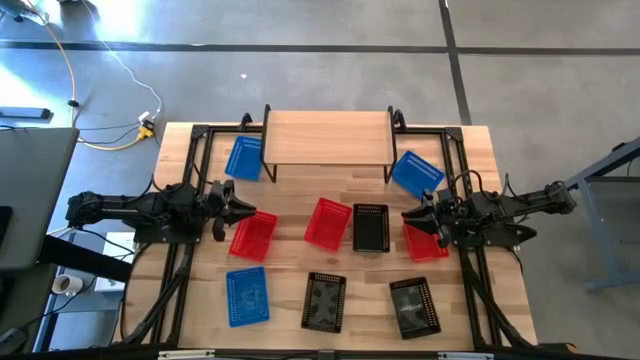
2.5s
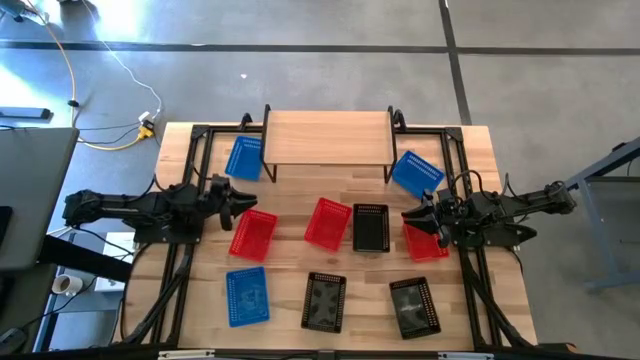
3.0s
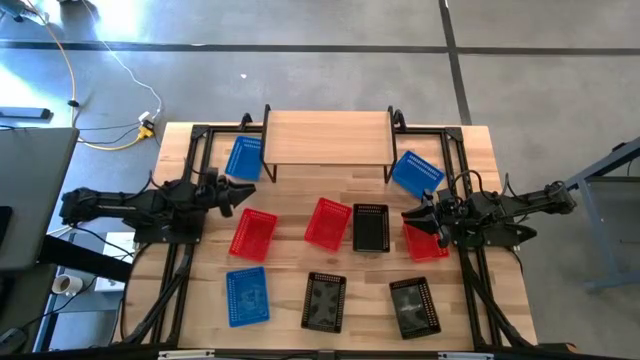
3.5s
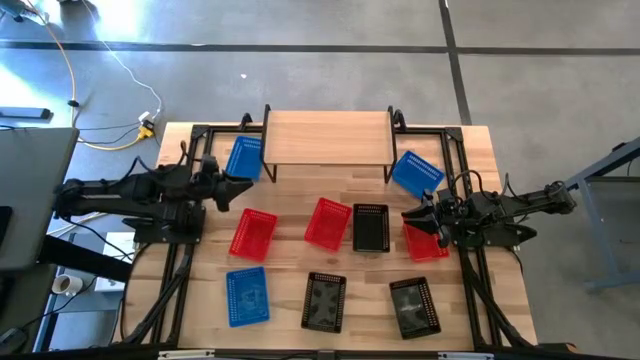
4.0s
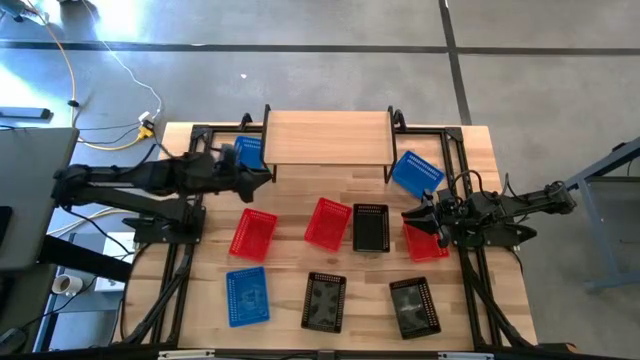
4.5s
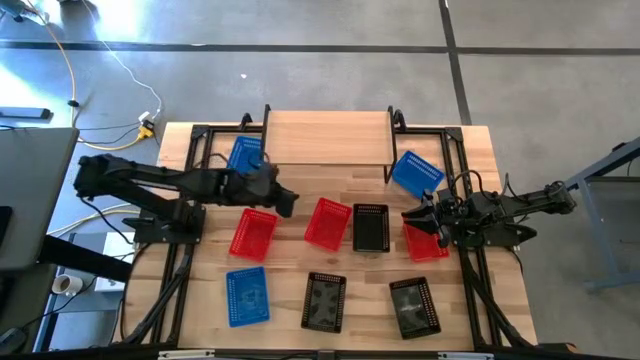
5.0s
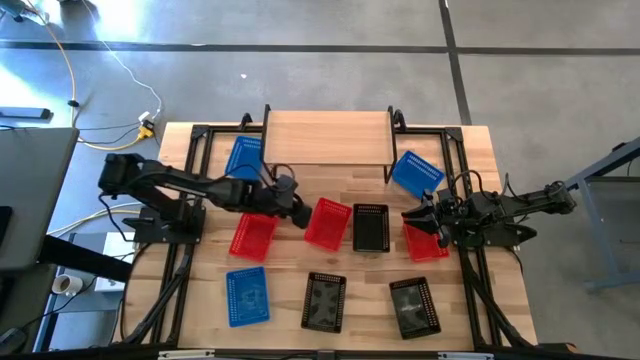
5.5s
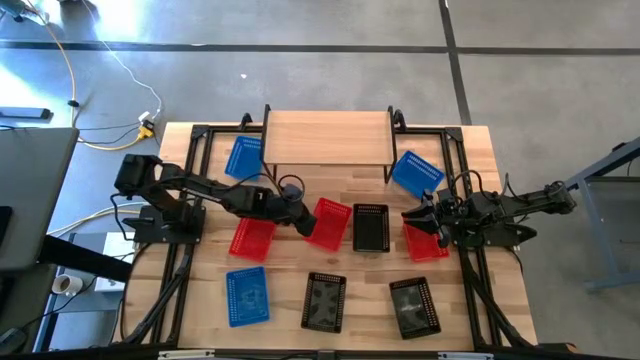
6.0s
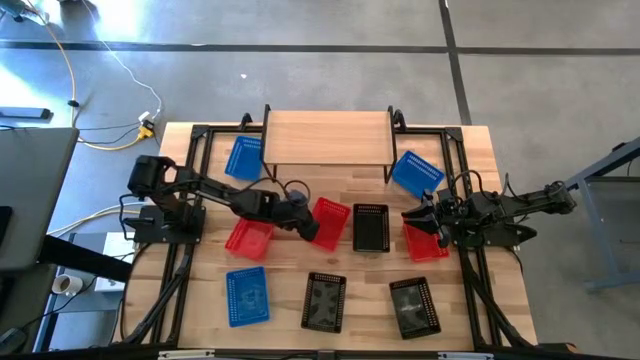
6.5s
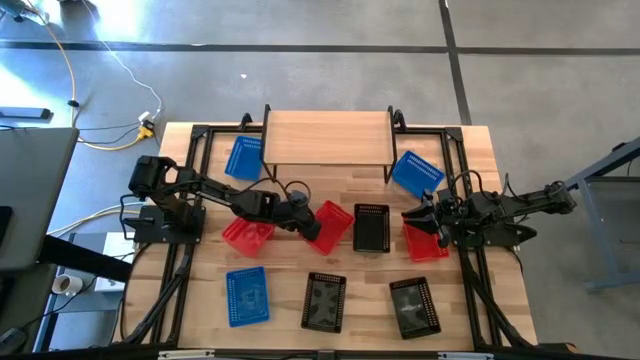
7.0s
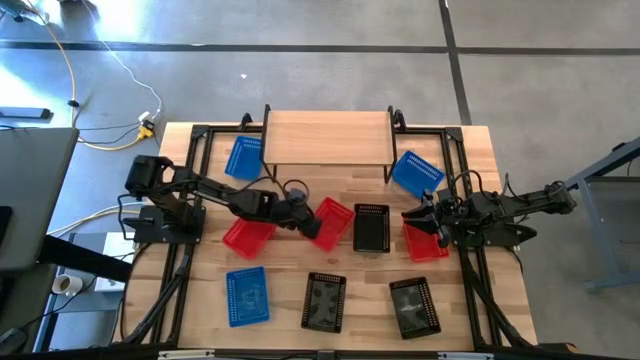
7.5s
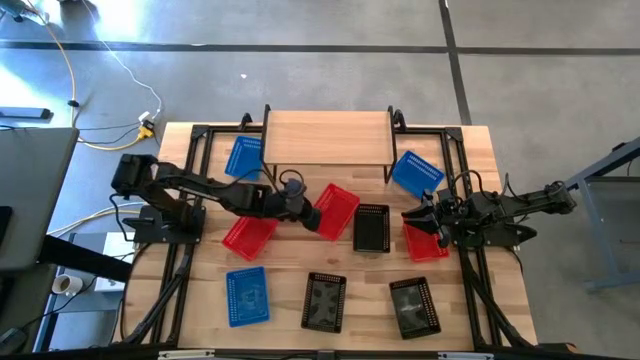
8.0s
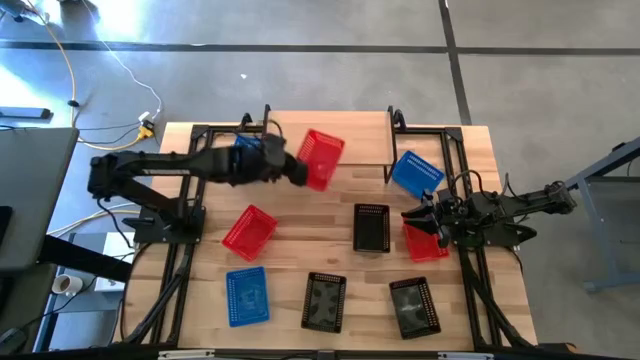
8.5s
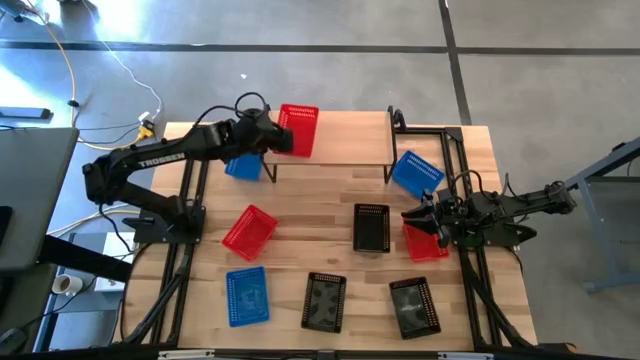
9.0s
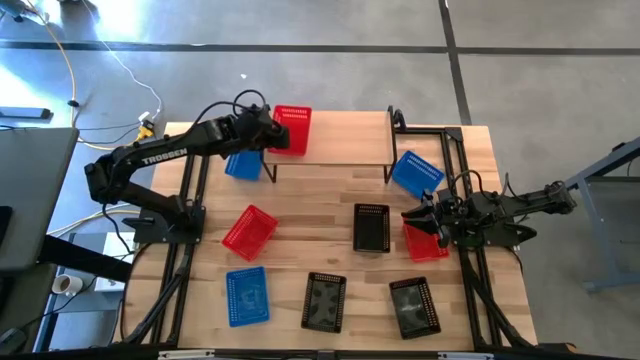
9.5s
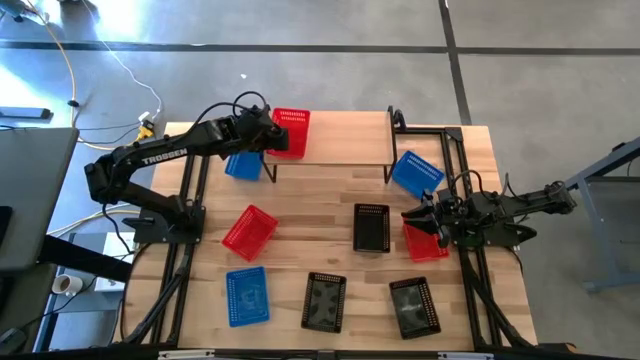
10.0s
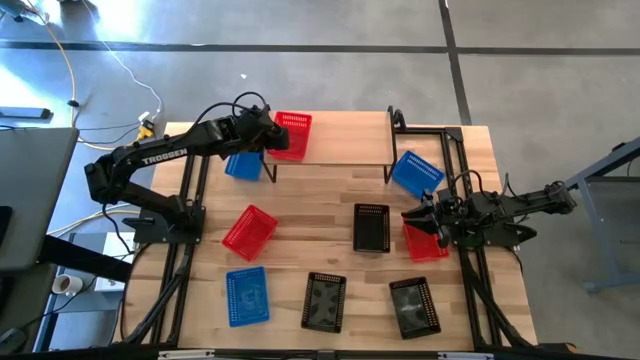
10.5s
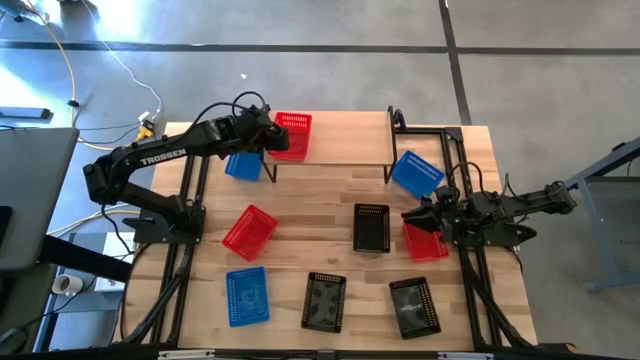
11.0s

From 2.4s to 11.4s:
Task: Stack baskets on shelf by color
Put the middle red bin on the shelf

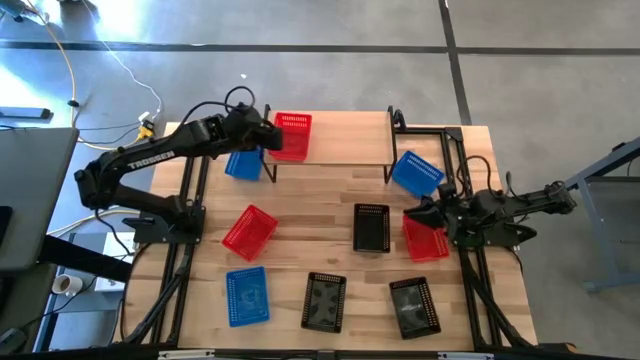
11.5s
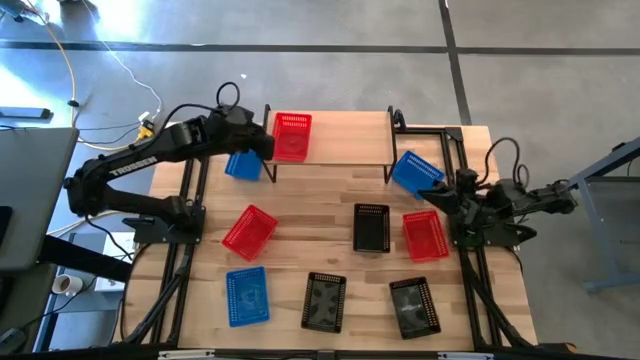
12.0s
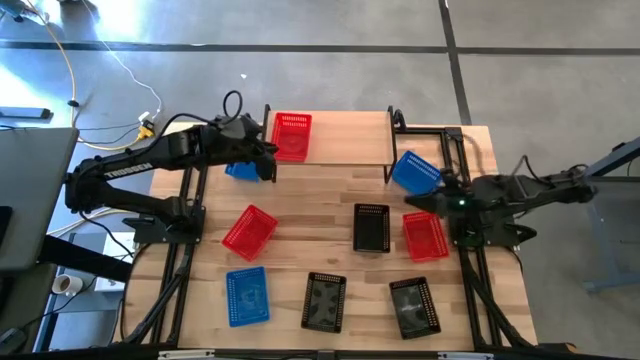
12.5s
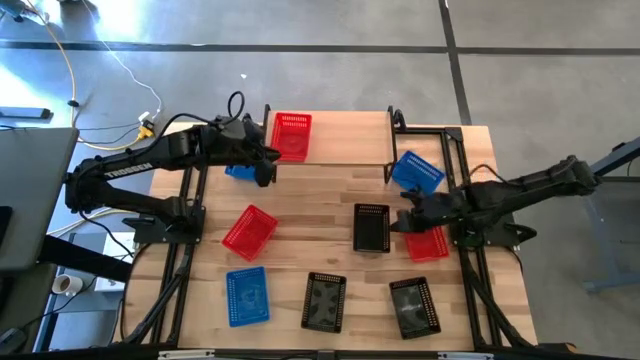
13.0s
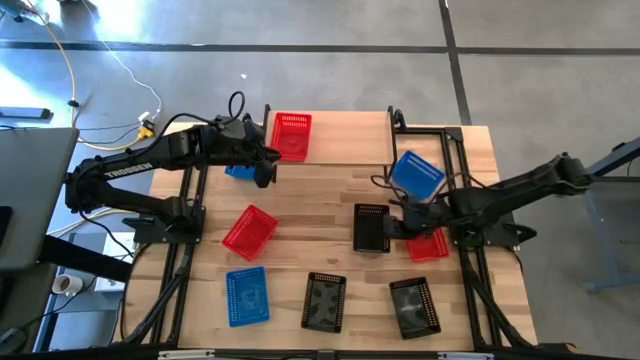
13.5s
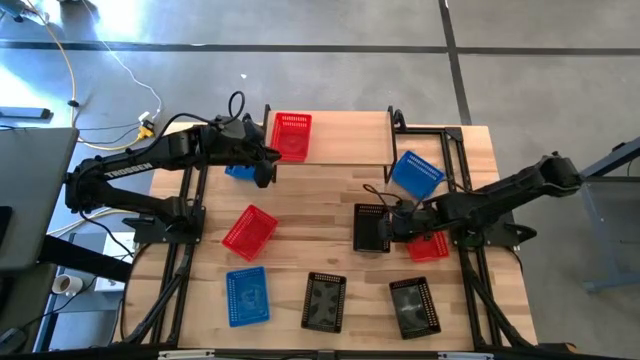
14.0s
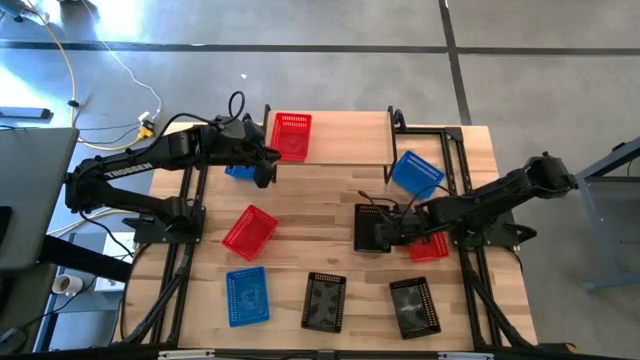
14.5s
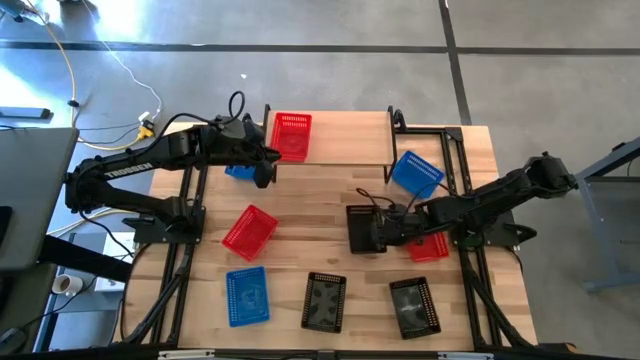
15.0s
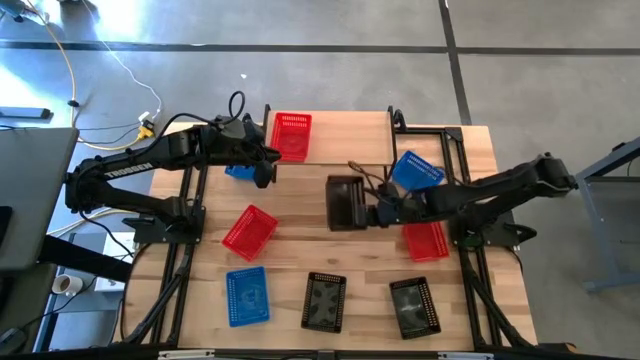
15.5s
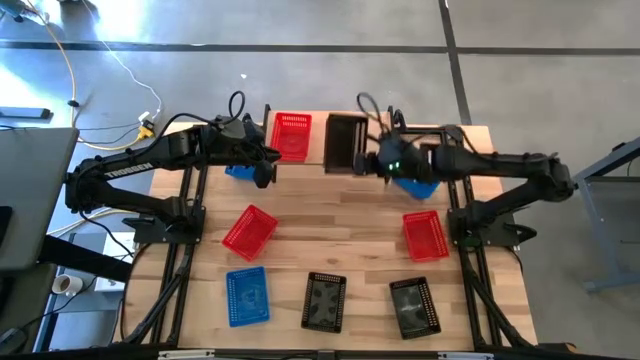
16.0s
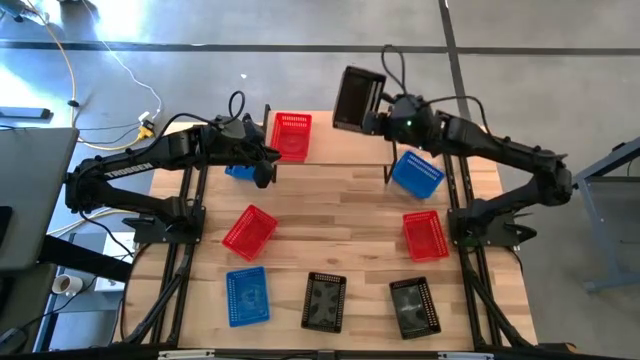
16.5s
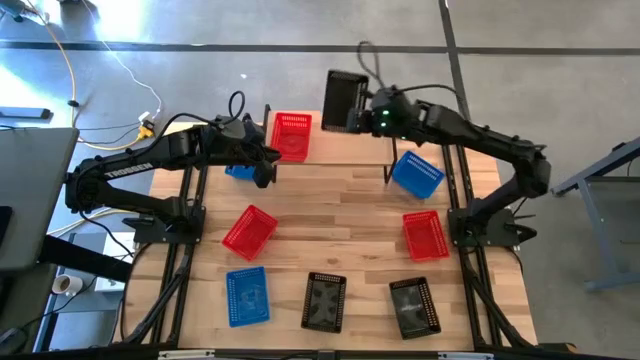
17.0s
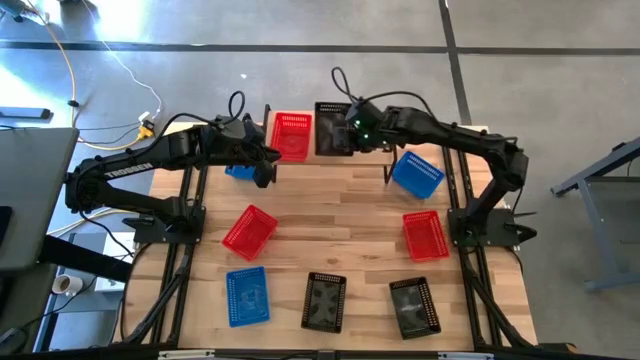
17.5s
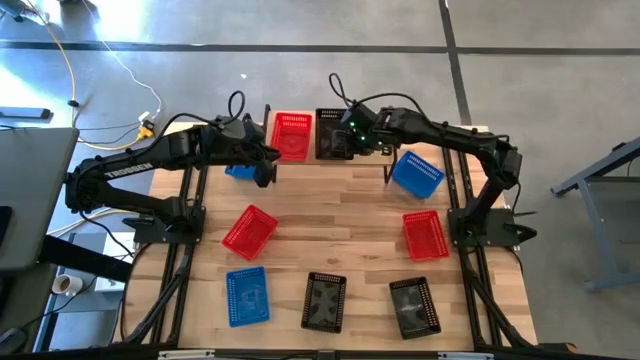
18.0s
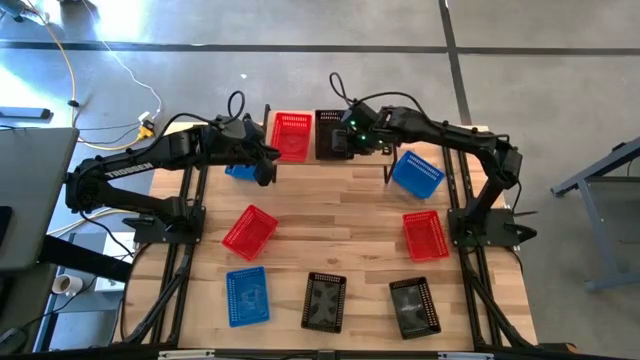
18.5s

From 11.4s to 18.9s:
Put the top black bin on the shelf

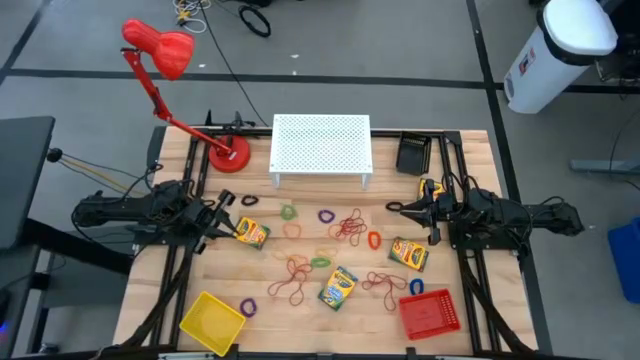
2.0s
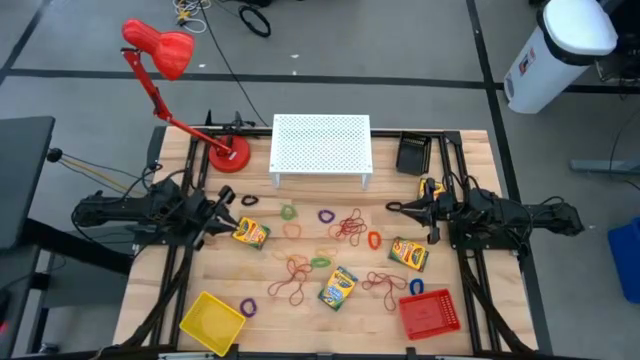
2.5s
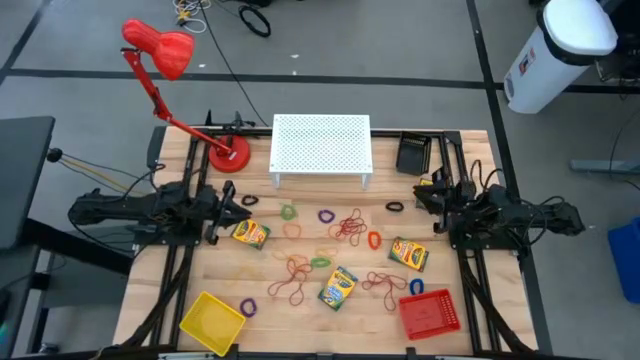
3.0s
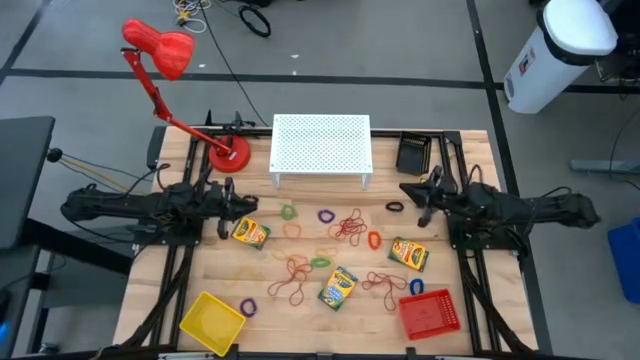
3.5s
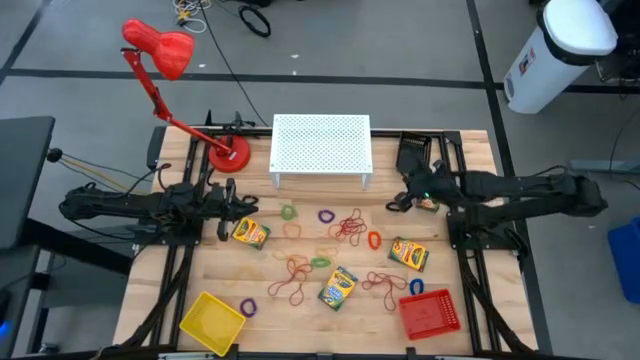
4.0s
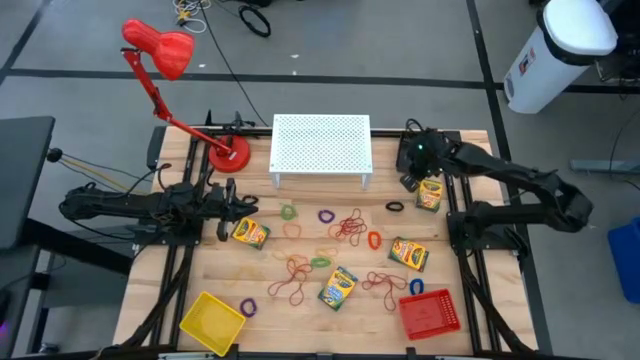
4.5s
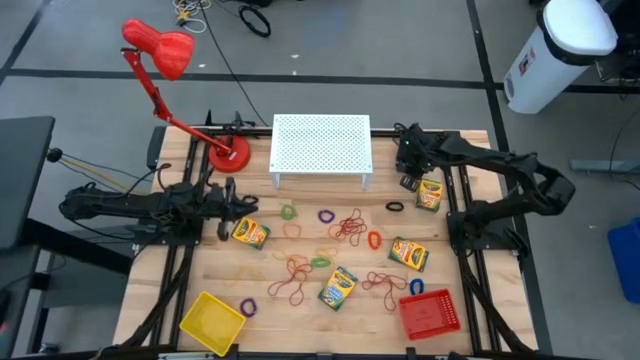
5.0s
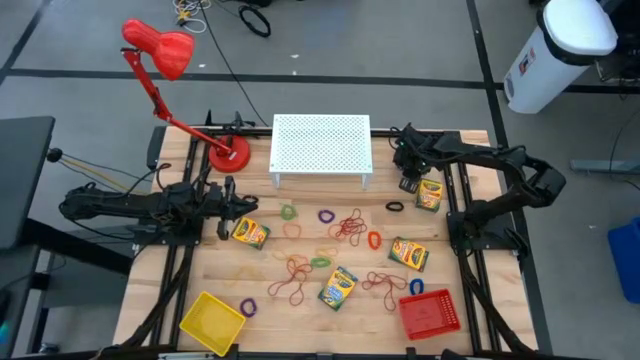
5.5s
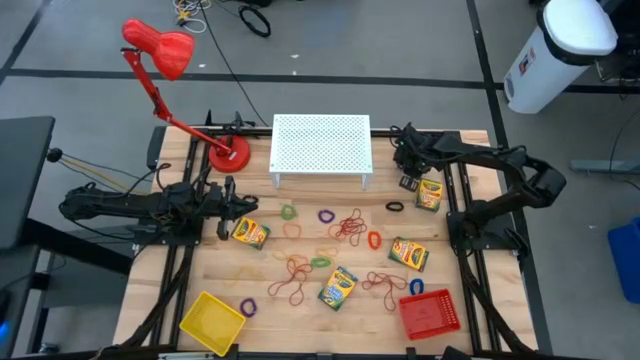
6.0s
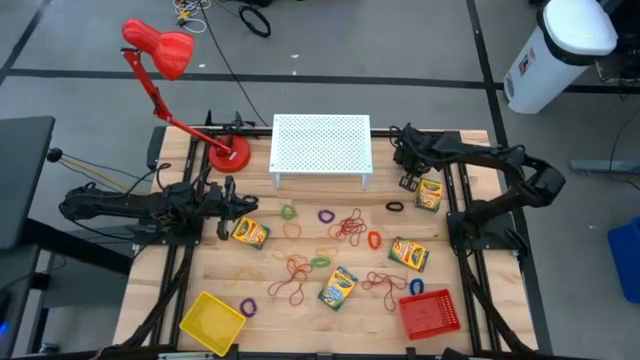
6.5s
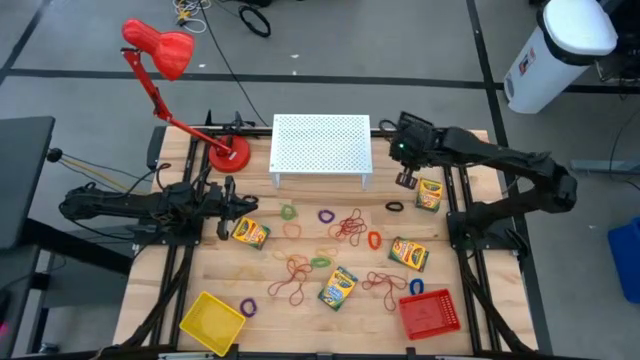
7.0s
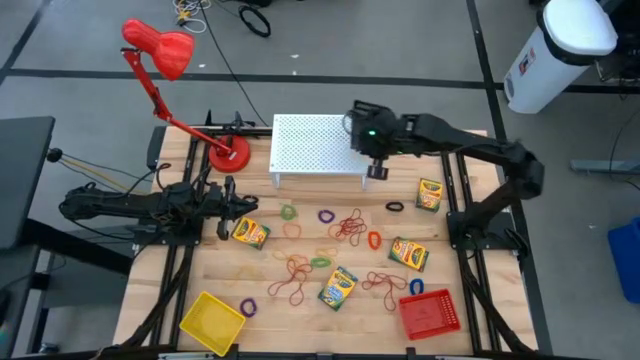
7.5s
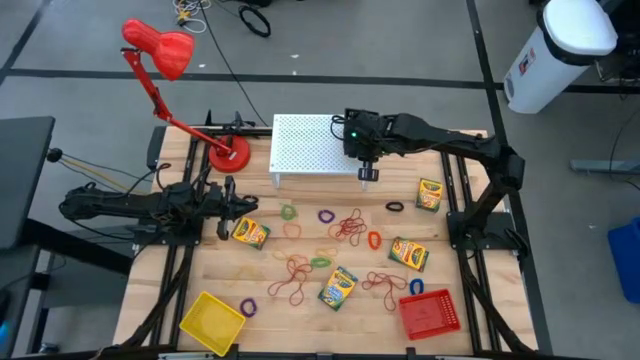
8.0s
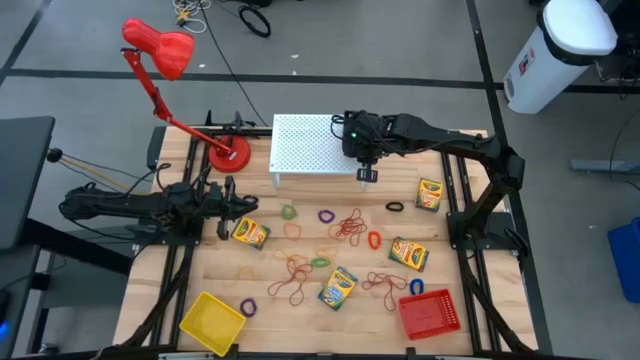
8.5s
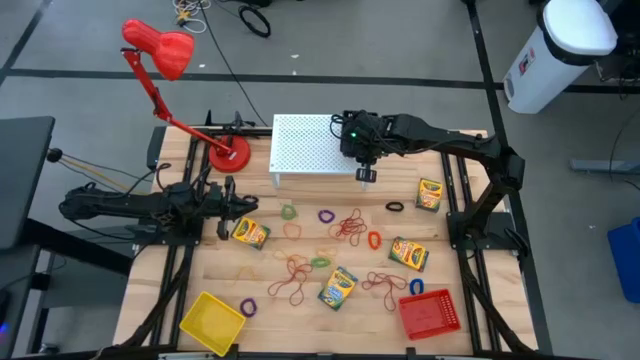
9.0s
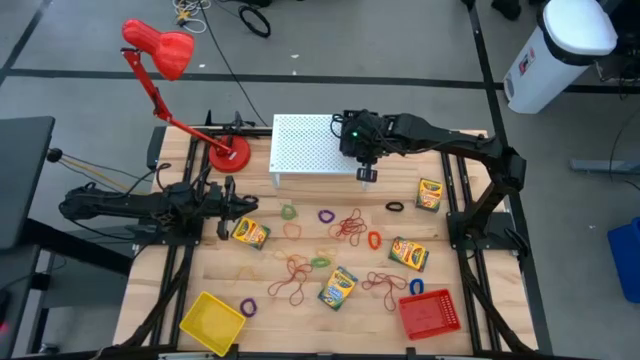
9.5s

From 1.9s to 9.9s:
Task: Pick & Place Office Desk Supplies
Put the black bin on the shelf
